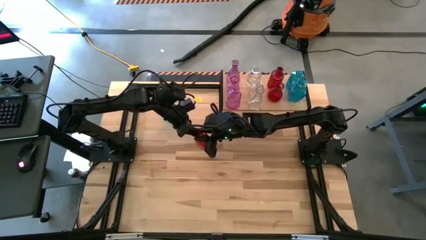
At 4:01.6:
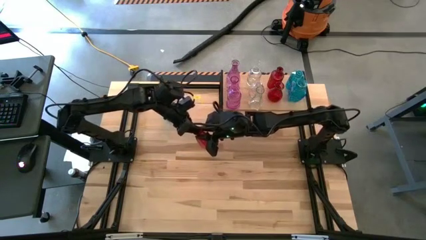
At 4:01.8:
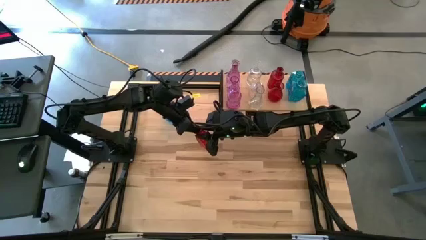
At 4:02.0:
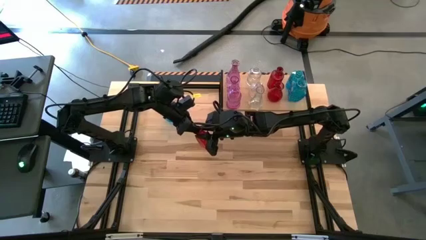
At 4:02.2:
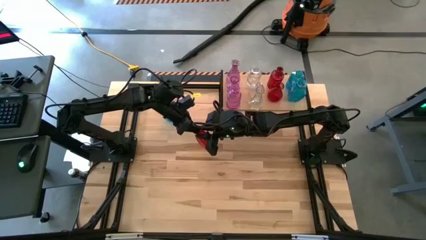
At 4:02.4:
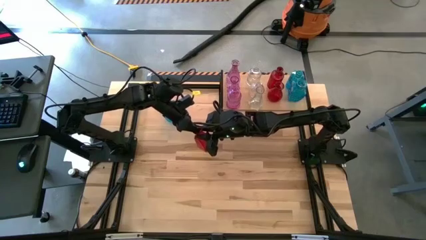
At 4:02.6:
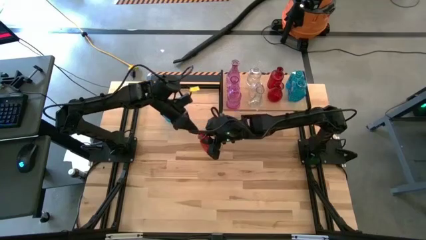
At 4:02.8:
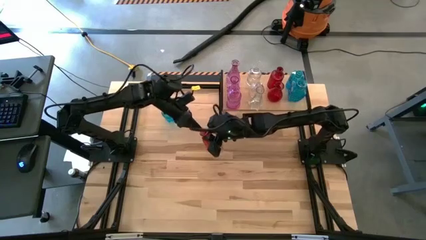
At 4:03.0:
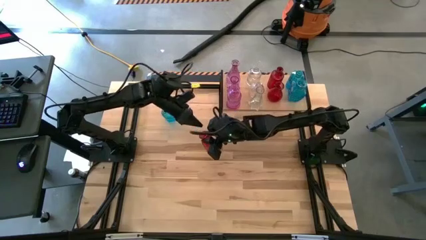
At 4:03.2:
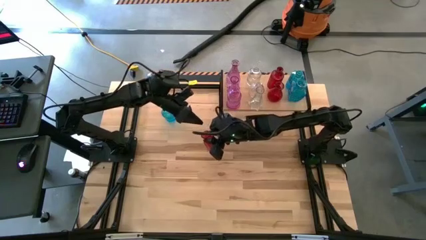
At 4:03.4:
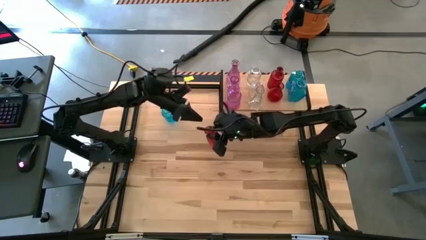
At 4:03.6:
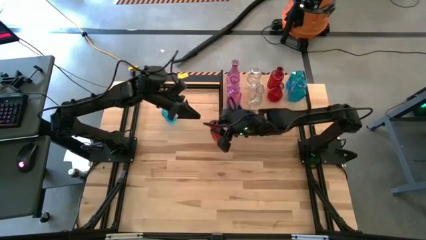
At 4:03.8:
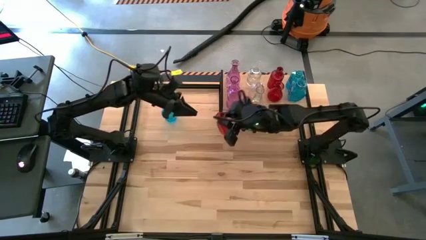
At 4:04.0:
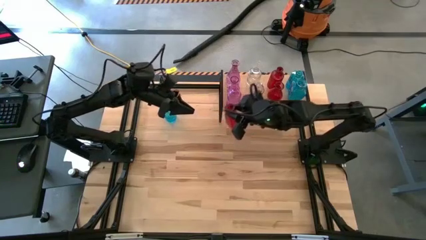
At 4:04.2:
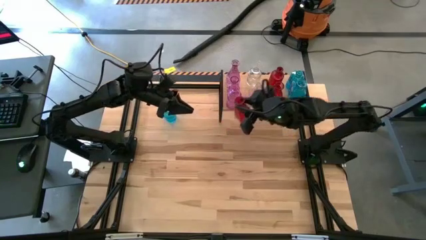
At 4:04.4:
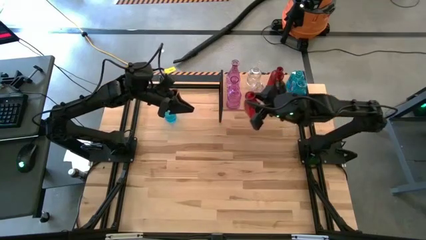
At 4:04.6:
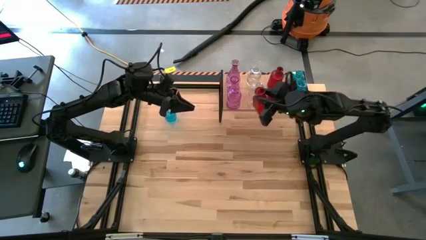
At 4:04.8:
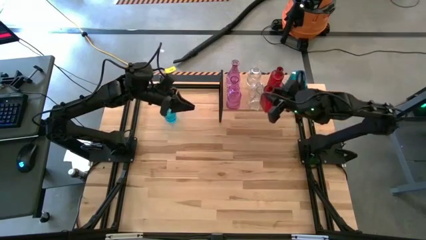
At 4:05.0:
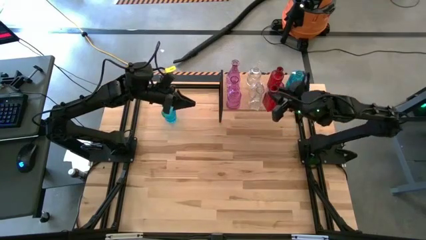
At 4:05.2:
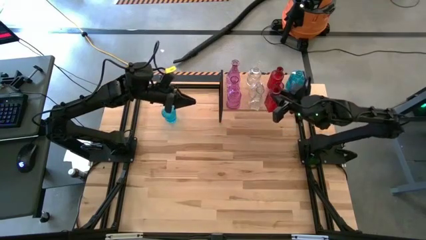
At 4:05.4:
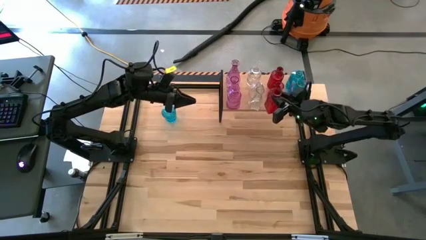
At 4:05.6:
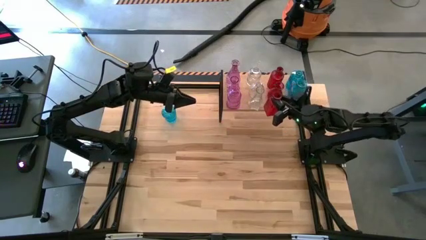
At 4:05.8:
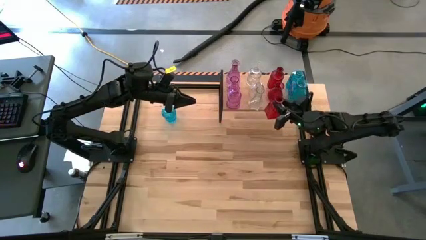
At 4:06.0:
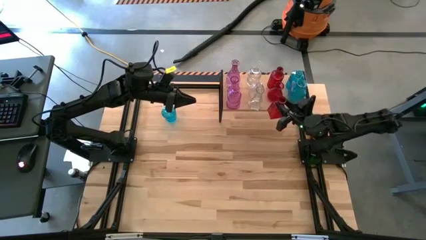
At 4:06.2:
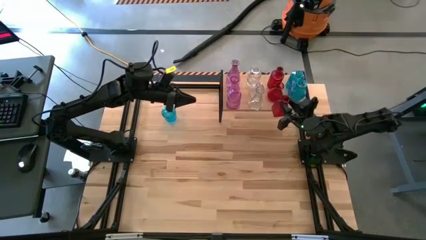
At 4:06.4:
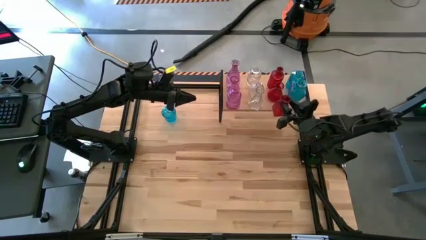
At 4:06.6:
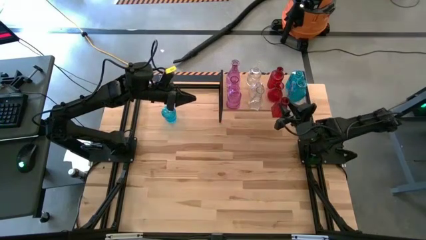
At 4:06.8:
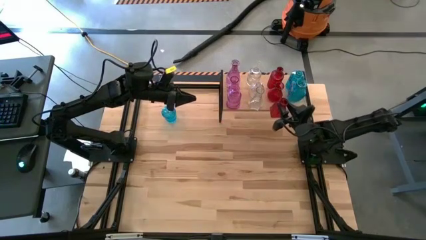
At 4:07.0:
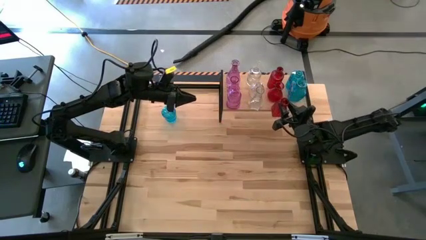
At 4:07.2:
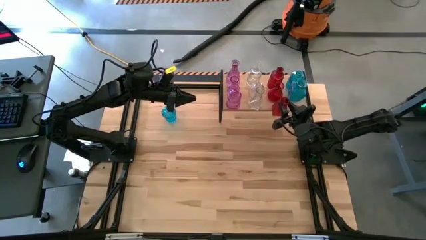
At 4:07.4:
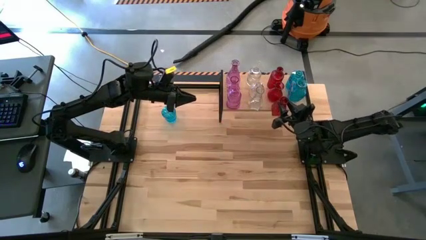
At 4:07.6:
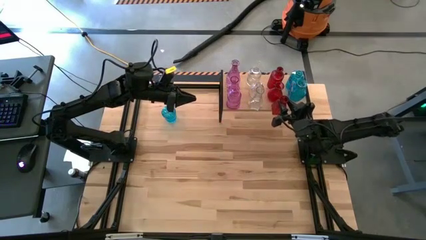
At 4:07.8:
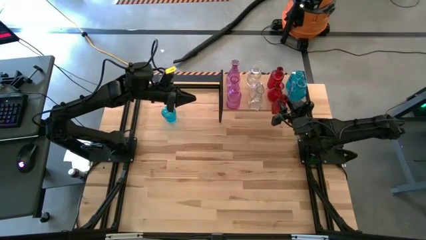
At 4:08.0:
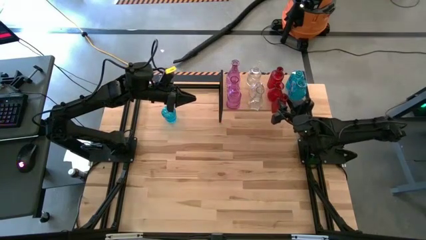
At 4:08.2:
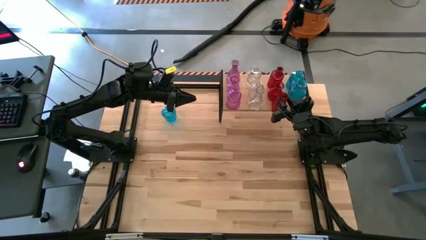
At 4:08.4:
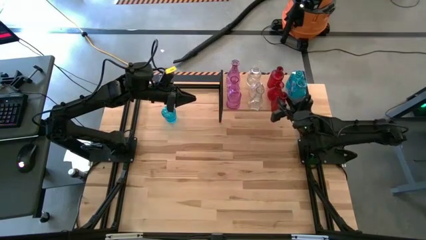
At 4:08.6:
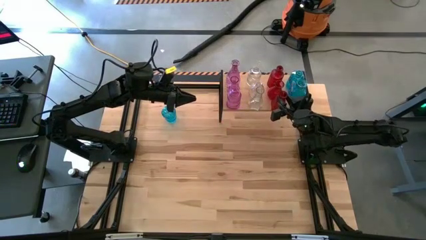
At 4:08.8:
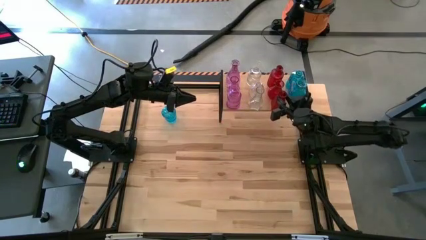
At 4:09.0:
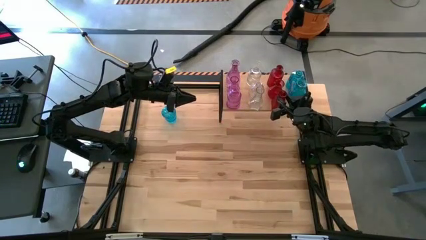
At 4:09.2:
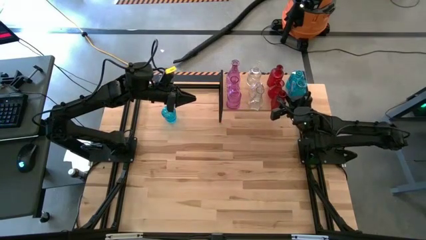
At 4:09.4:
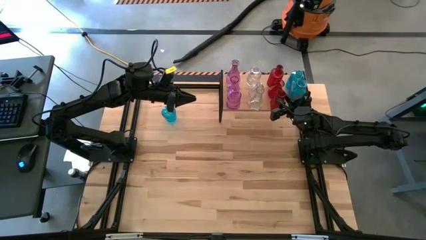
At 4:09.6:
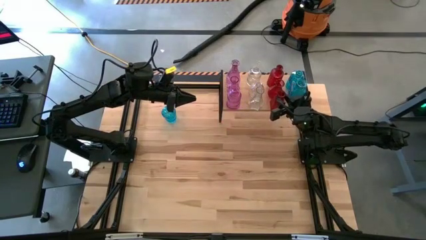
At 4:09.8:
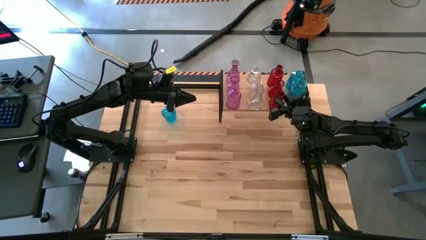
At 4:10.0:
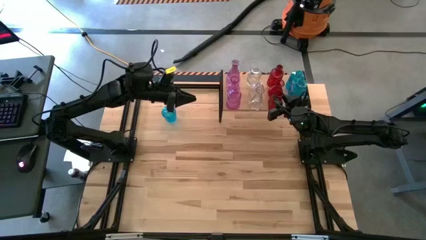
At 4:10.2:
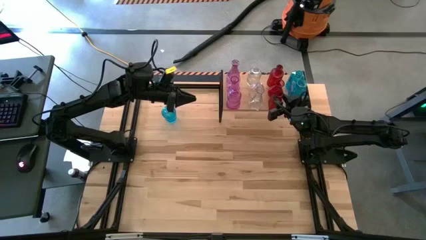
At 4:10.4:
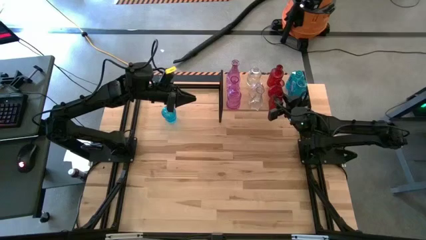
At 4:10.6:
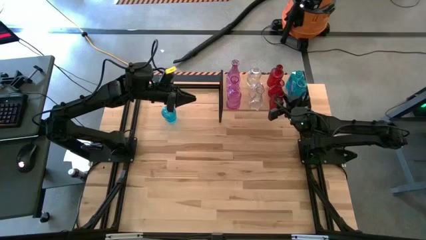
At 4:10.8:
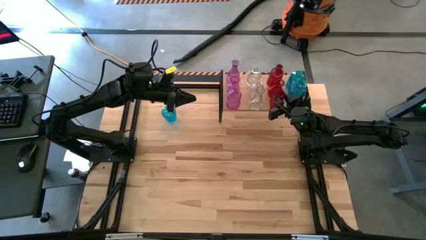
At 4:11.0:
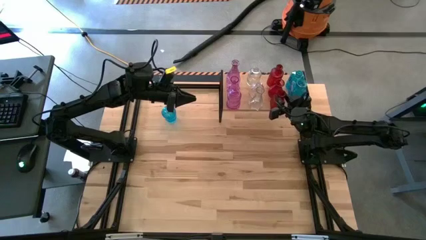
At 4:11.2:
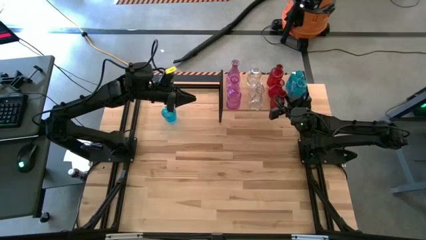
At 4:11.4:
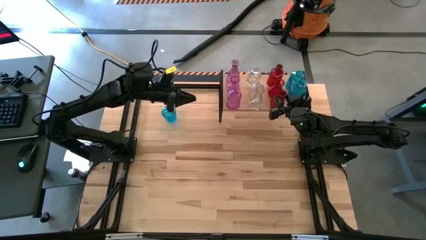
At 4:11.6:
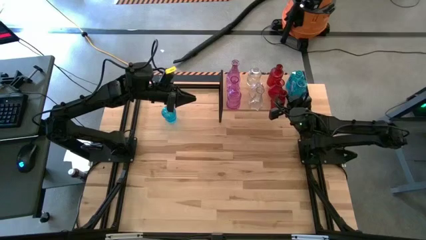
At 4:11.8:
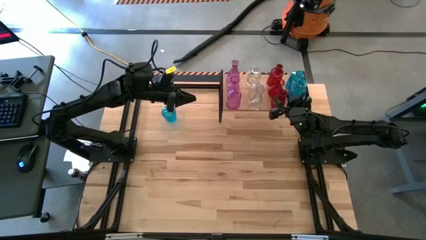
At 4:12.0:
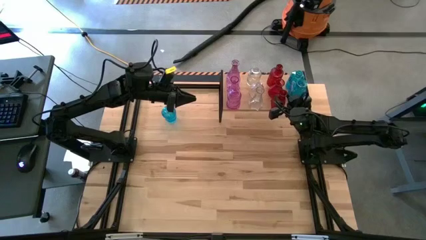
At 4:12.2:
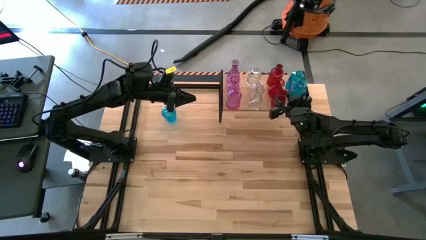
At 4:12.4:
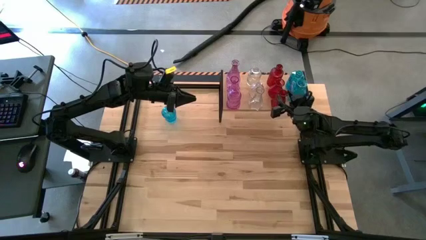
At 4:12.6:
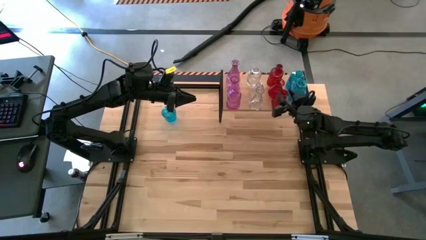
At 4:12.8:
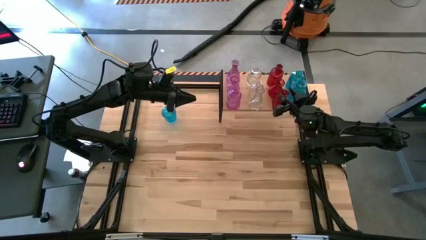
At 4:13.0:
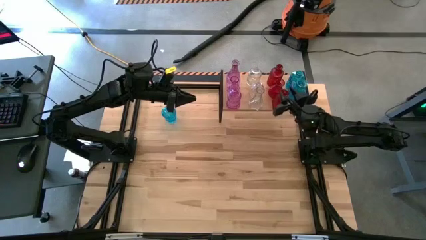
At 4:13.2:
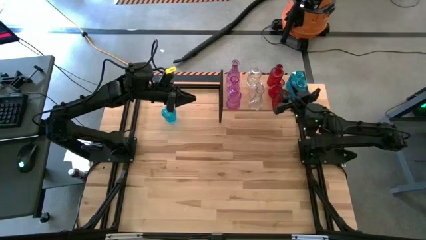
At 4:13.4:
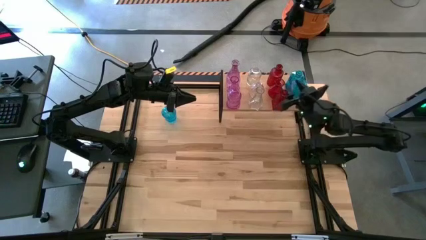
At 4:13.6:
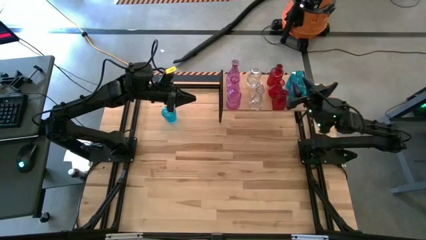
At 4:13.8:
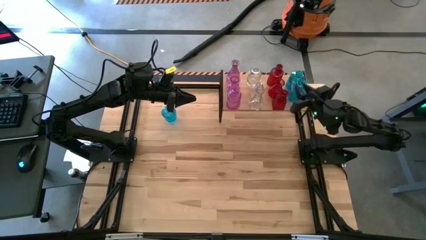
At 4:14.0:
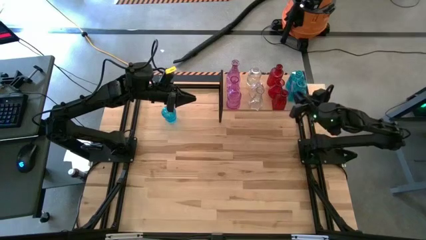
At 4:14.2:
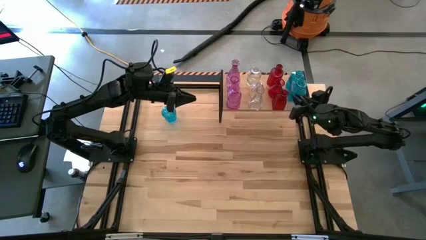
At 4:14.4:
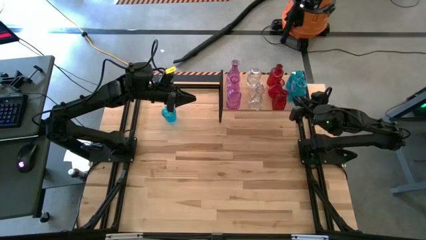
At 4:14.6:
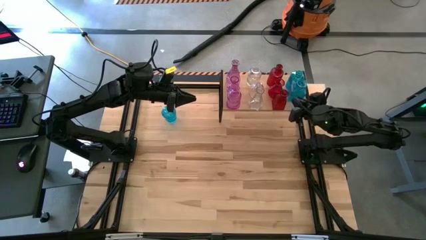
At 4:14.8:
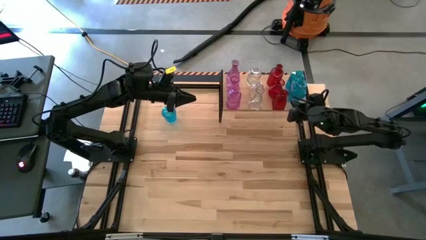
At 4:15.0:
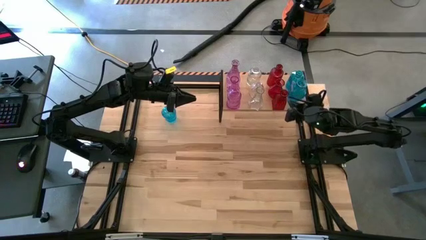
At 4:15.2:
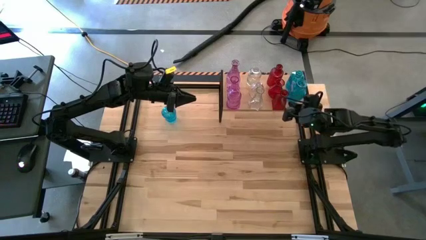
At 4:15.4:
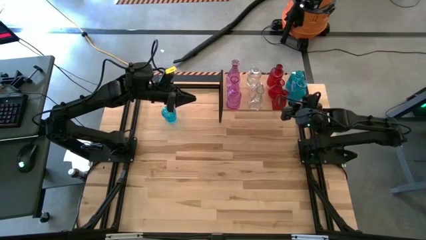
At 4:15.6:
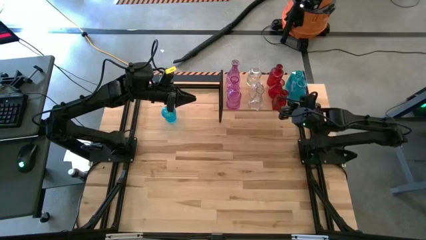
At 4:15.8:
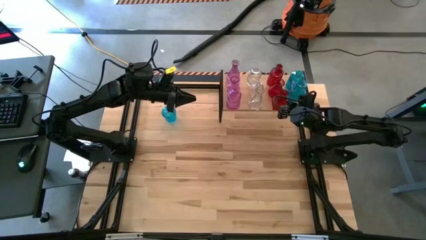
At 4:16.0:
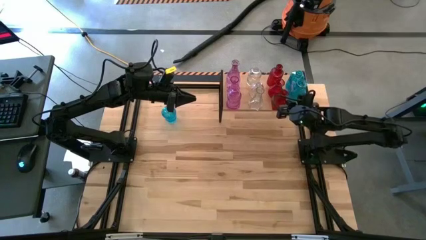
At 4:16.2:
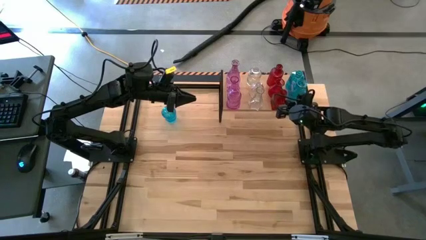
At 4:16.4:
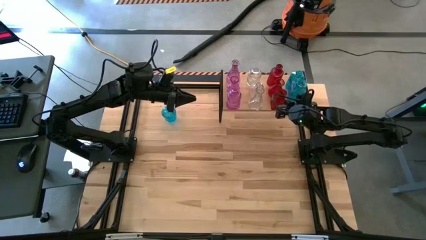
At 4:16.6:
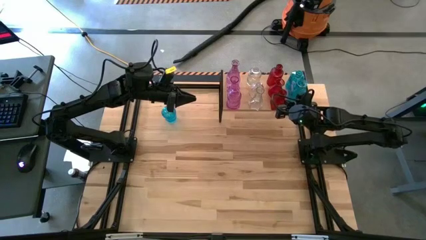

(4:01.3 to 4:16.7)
Task: sort vases onto shelf
Put the red vase on the shelf aligned with the other red vase
